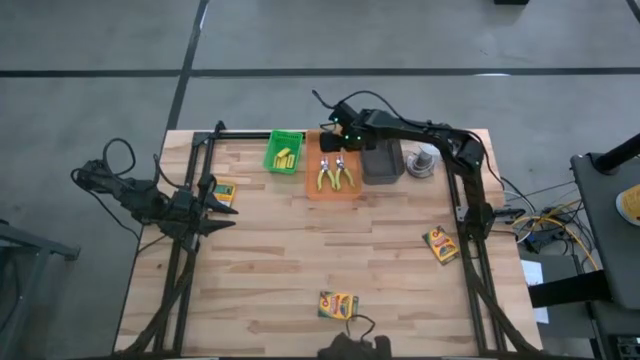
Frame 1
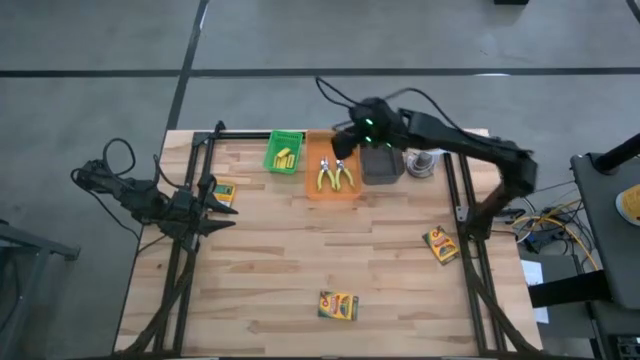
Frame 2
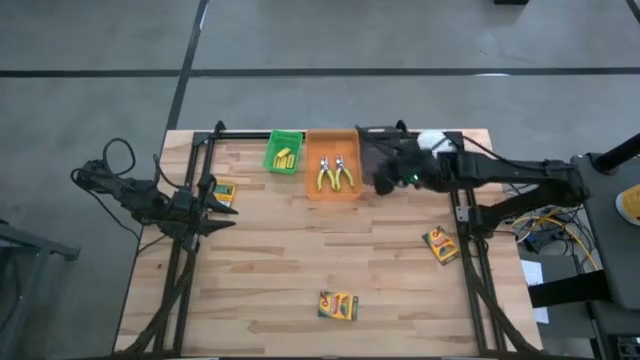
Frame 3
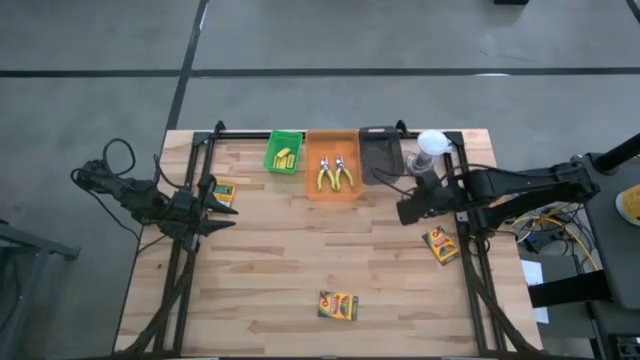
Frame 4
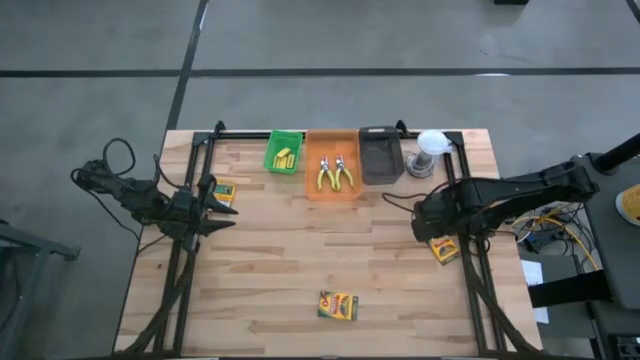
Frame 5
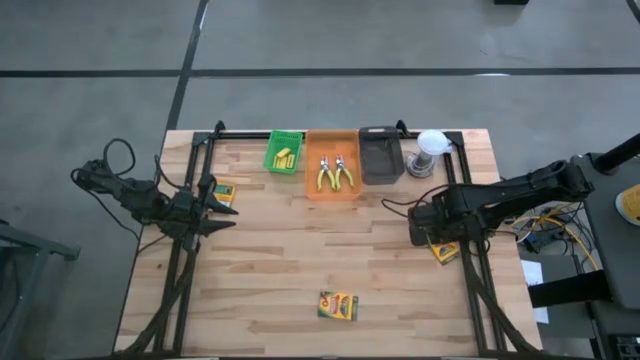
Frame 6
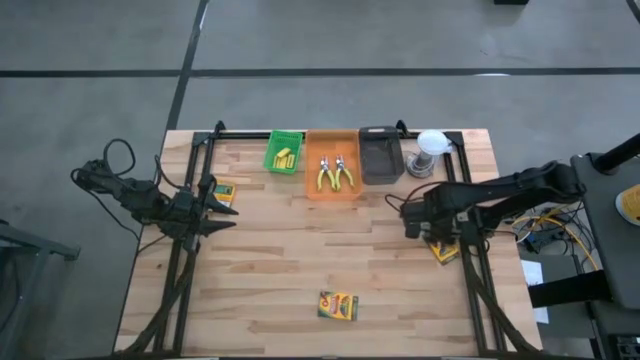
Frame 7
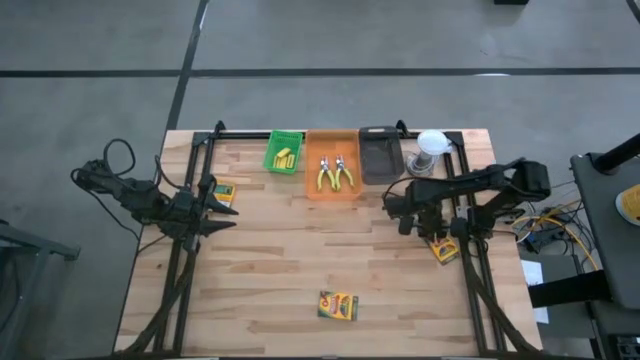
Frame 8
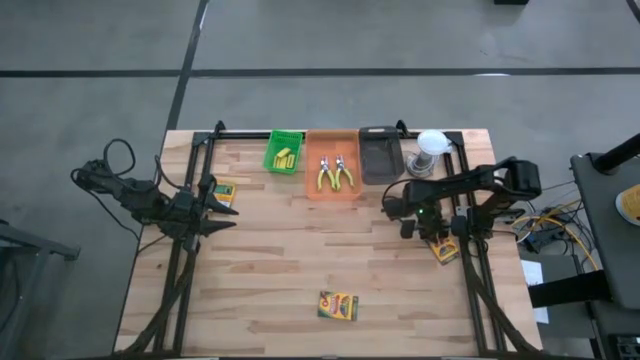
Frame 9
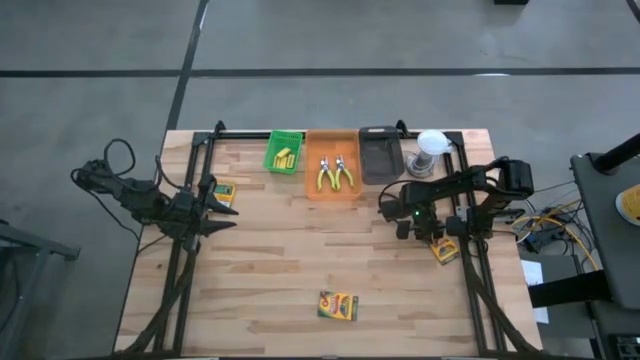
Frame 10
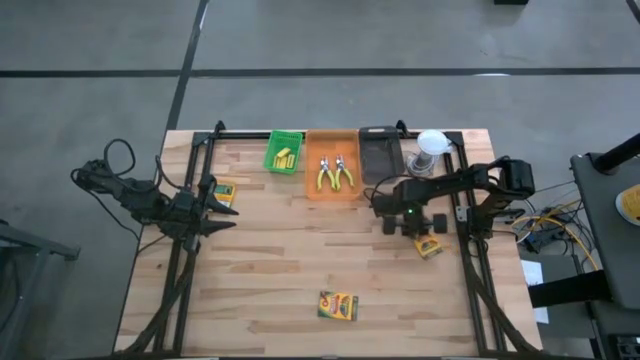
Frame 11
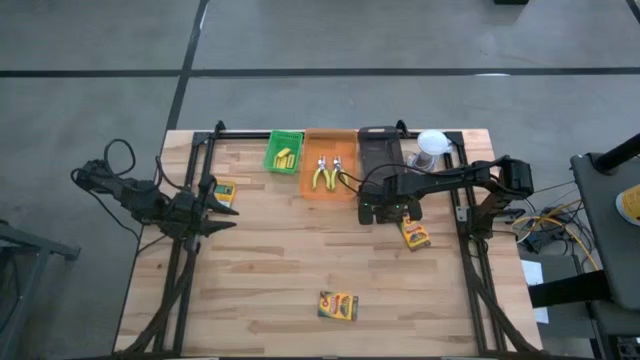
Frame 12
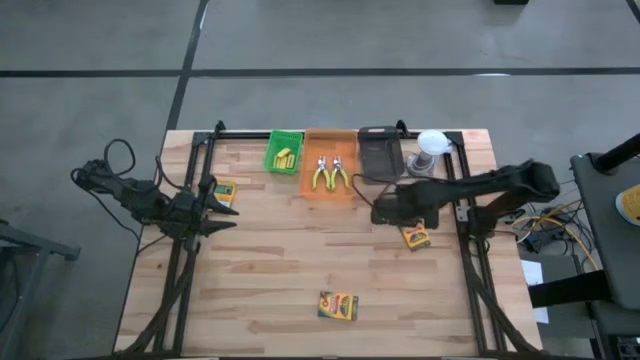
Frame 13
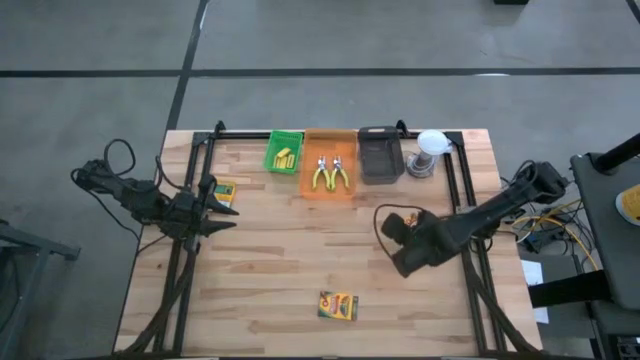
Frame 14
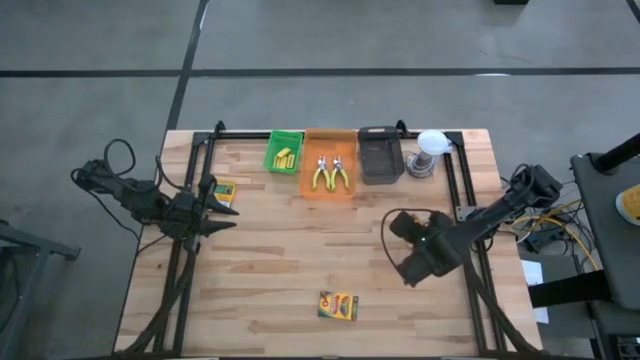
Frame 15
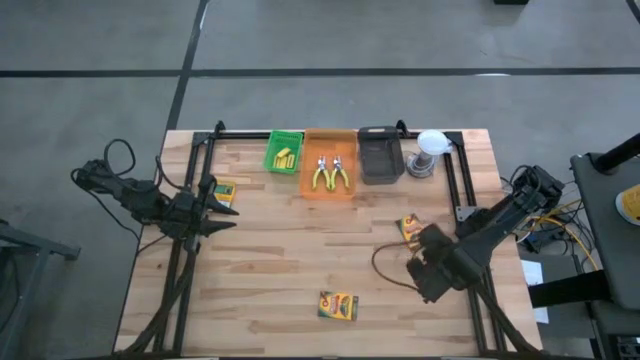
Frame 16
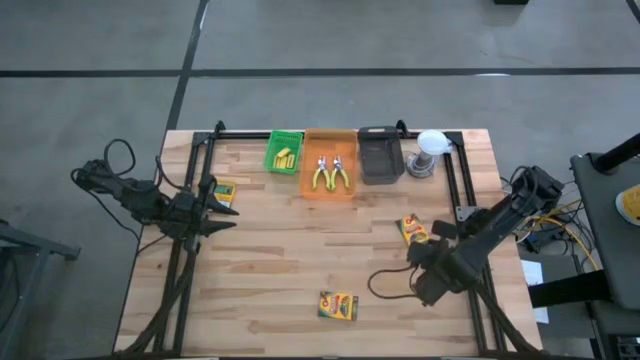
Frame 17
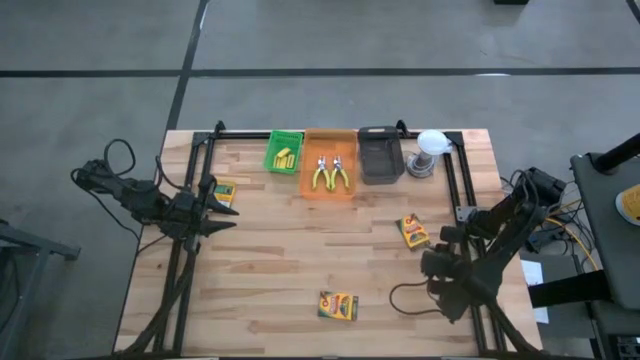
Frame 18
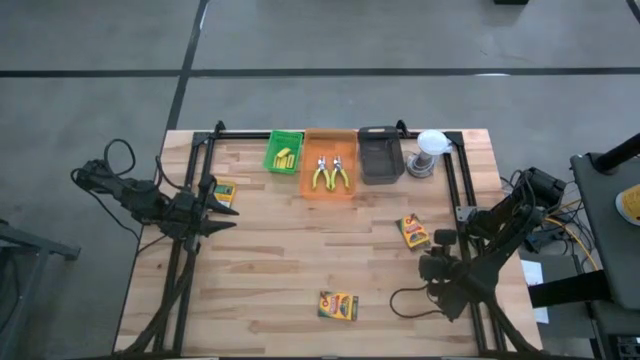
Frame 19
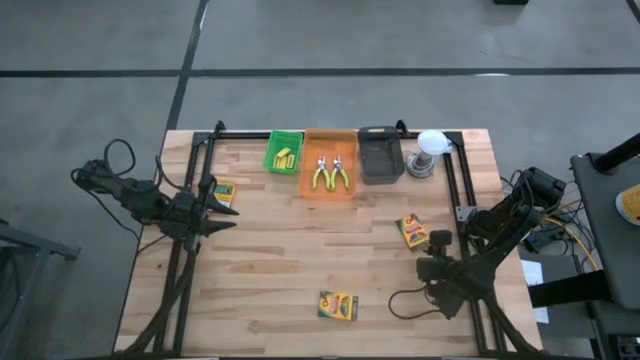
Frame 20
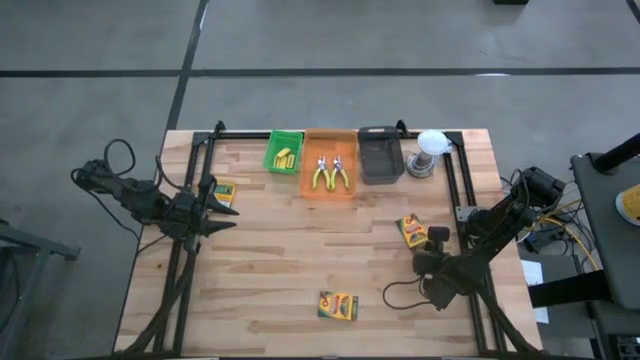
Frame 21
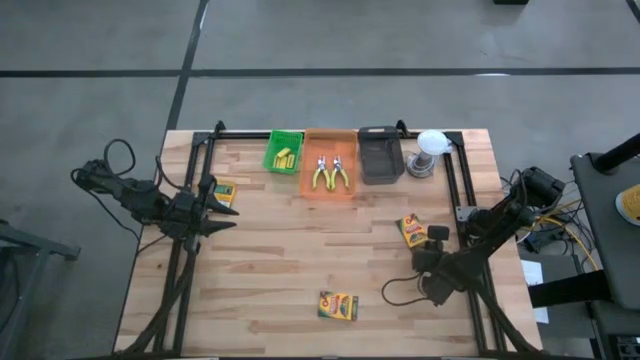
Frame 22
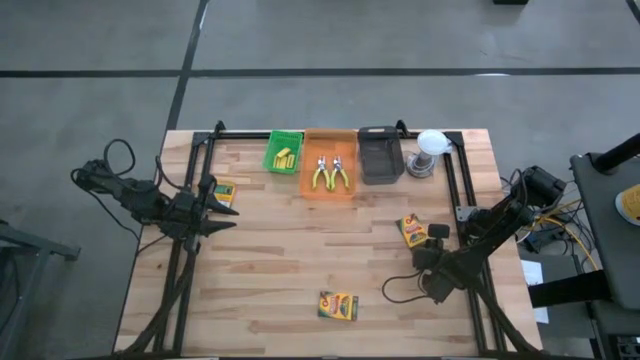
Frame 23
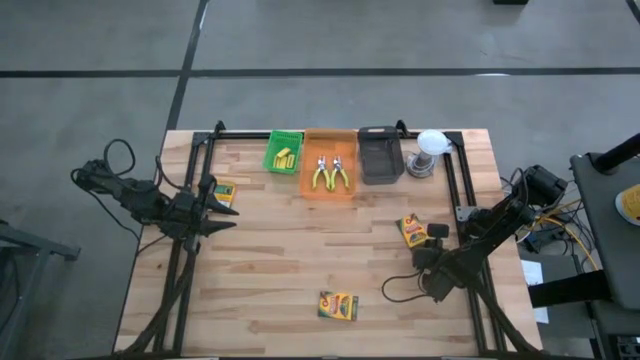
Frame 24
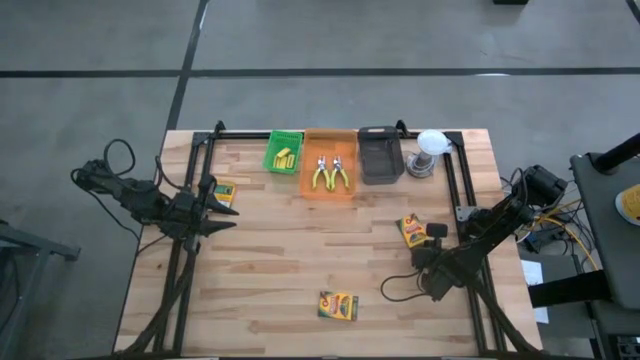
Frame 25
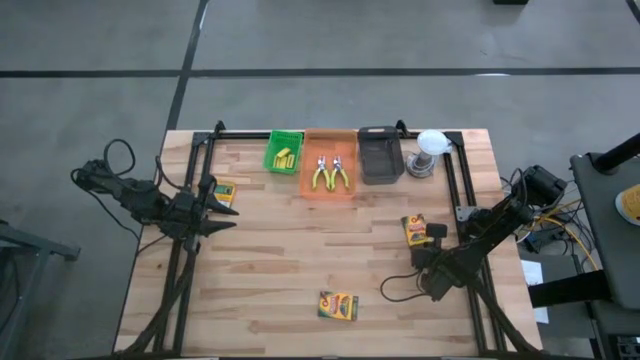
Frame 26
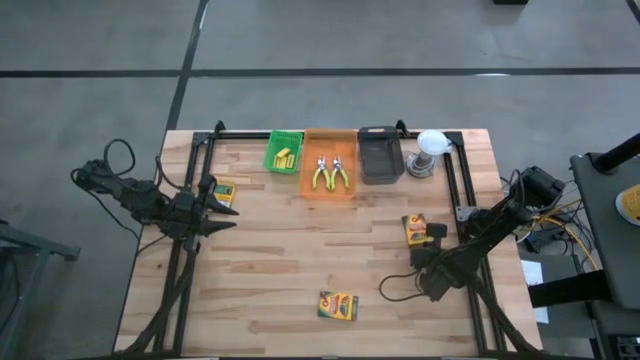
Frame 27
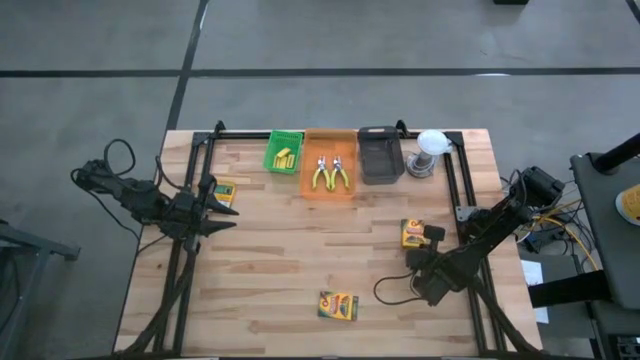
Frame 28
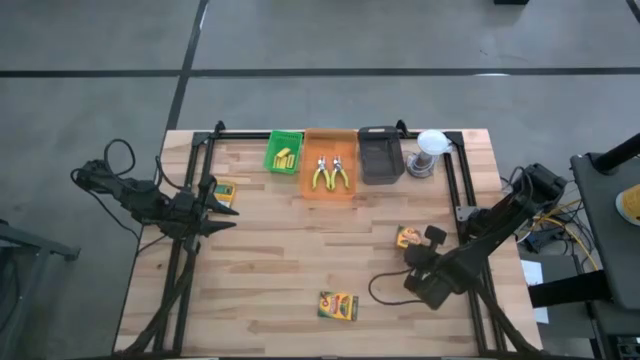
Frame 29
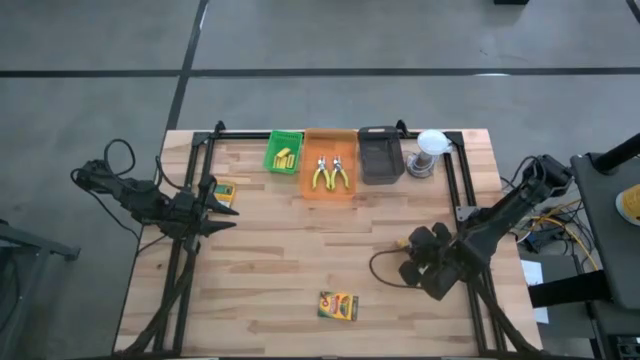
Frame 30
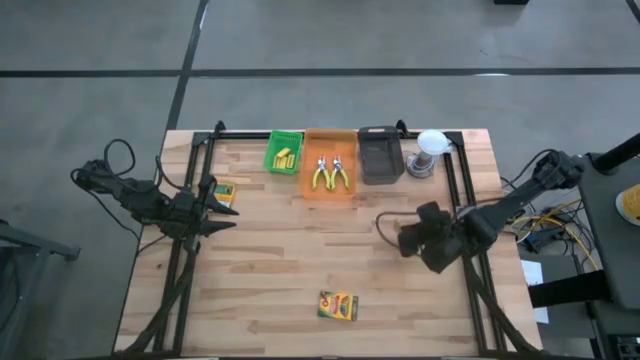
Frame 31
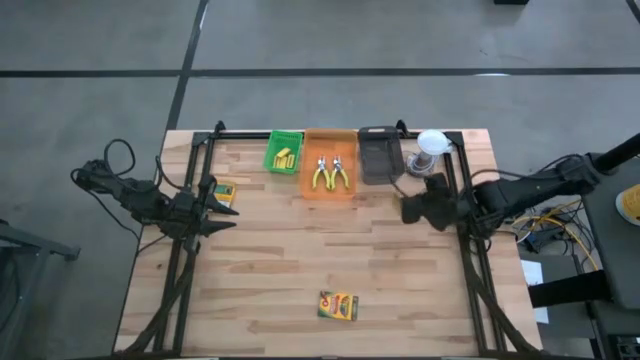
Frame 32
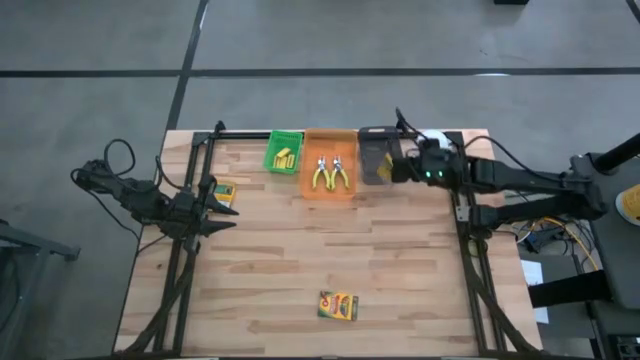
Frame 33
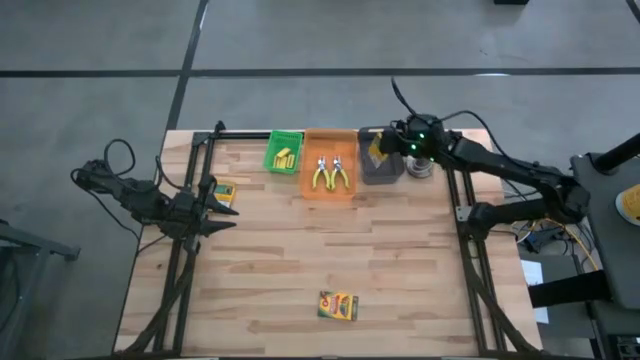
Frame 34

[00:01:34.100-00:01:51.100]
Task: Pick & Place School Supplies
Put the yellow crayon box into the black bin

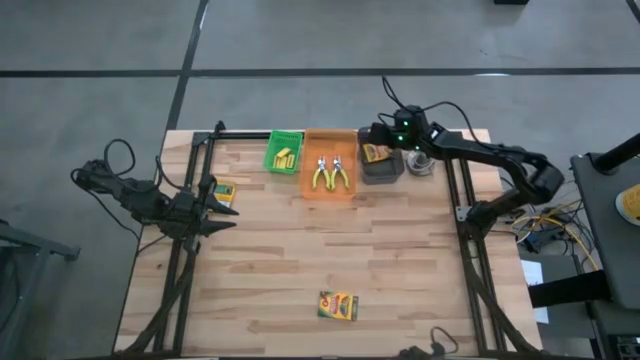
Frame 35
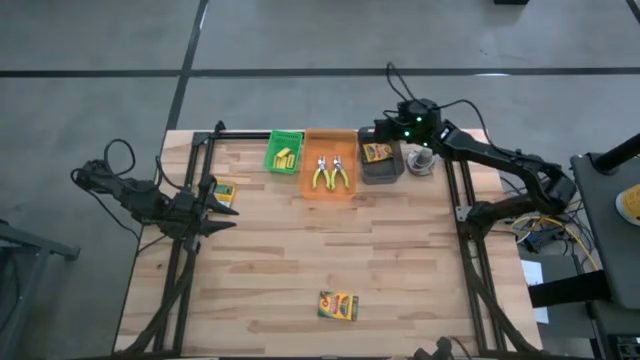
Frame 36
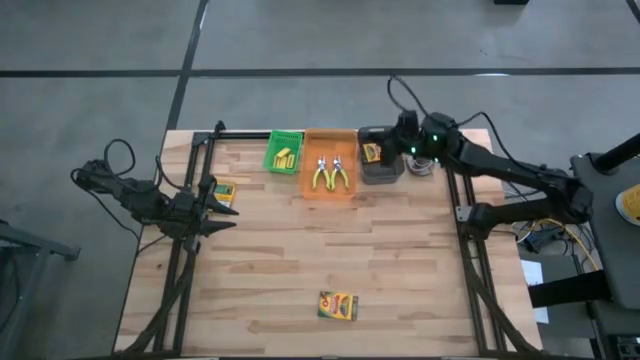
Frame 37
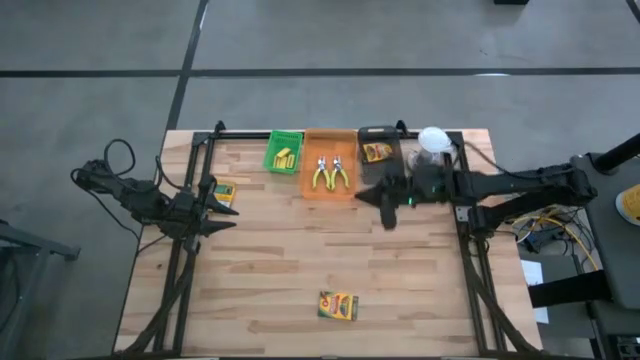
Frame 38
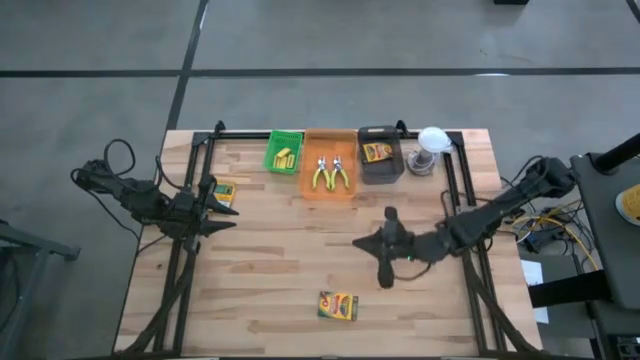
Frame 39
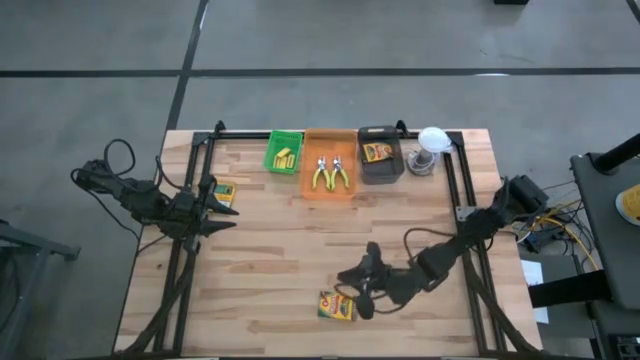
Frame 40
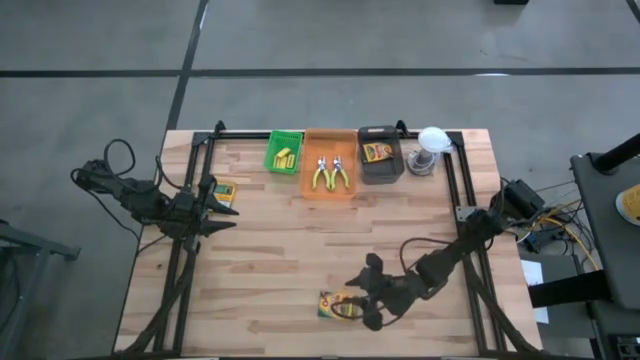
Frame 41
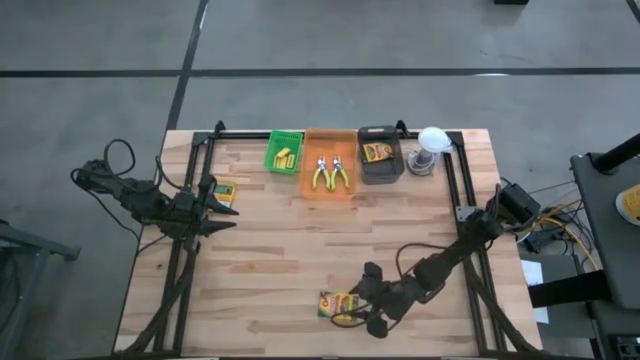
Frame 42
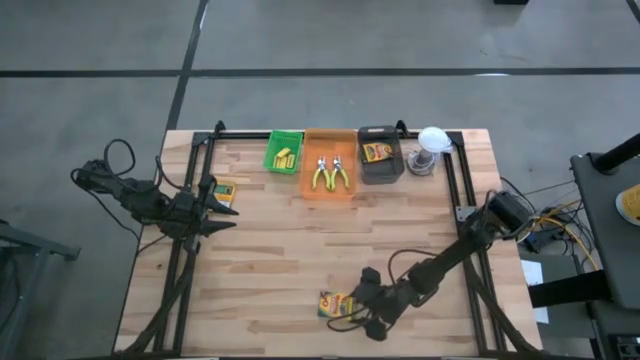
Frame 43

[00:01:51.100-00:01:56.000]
Put the yellow crayon box into the black bin
